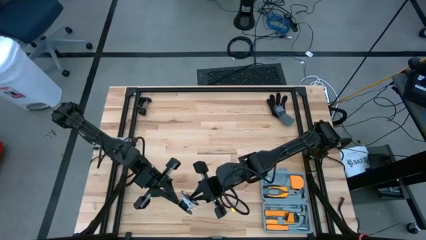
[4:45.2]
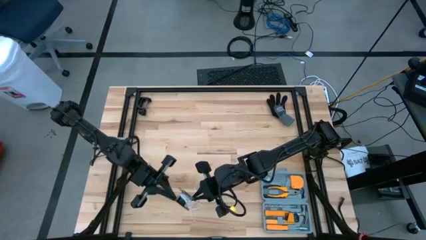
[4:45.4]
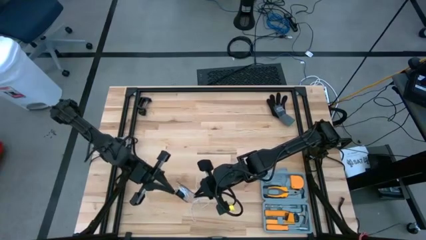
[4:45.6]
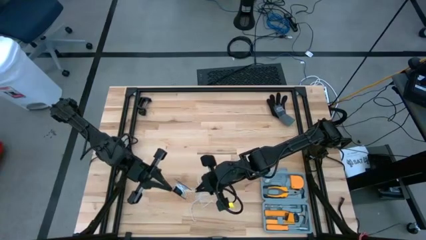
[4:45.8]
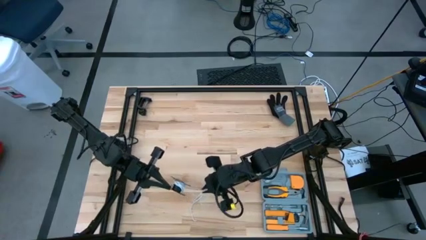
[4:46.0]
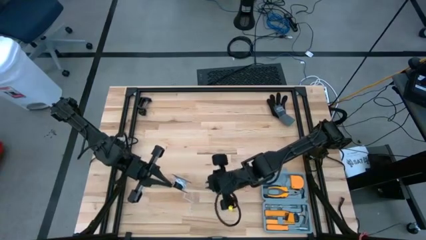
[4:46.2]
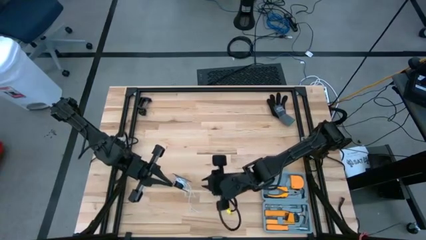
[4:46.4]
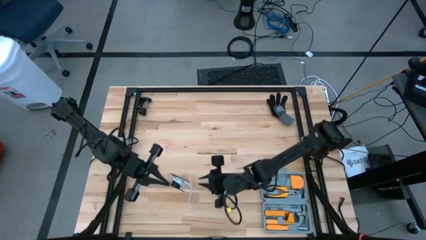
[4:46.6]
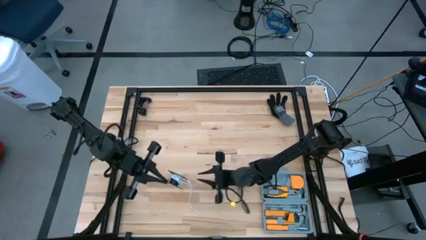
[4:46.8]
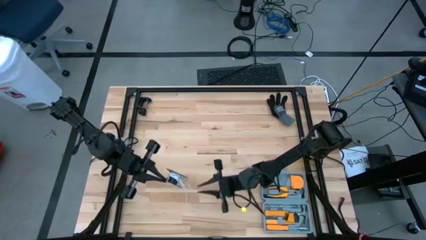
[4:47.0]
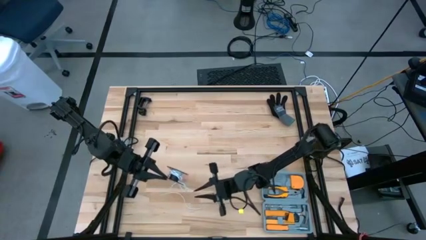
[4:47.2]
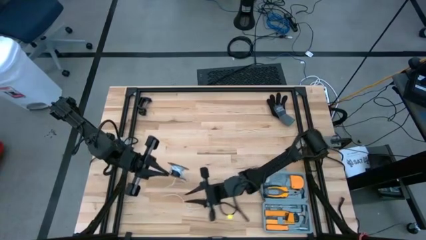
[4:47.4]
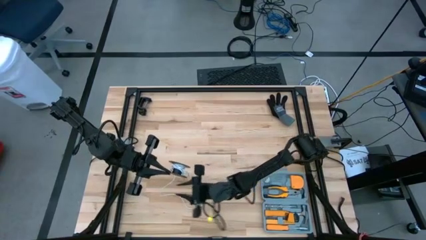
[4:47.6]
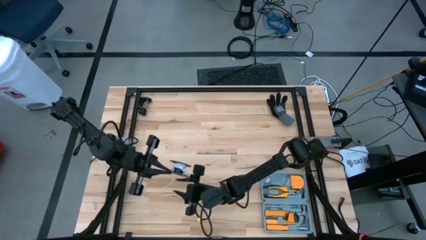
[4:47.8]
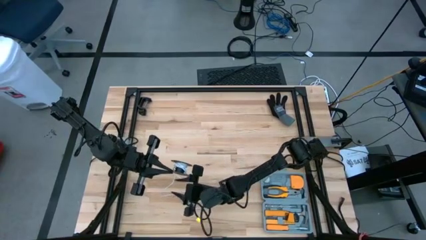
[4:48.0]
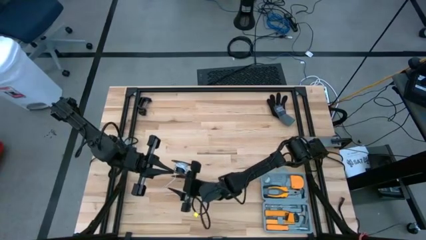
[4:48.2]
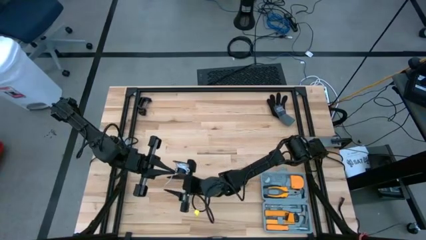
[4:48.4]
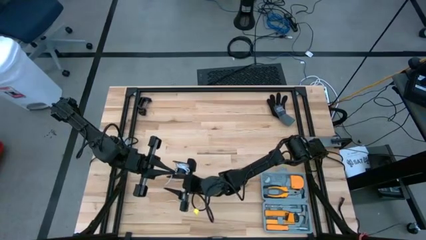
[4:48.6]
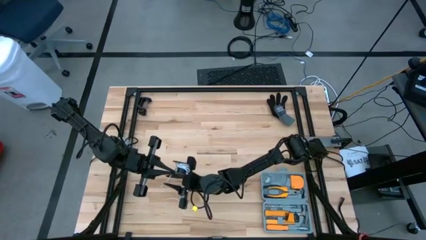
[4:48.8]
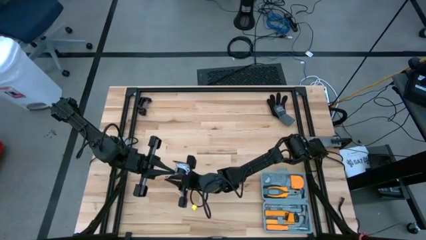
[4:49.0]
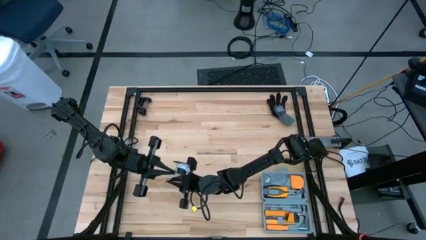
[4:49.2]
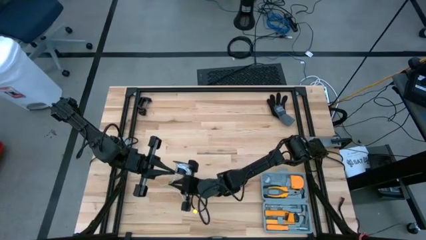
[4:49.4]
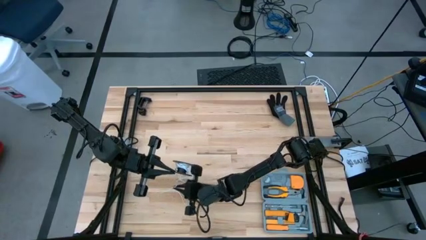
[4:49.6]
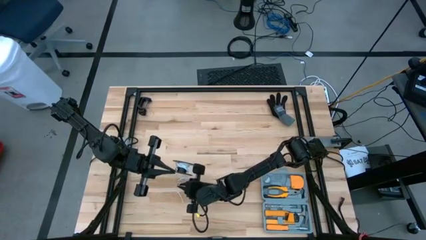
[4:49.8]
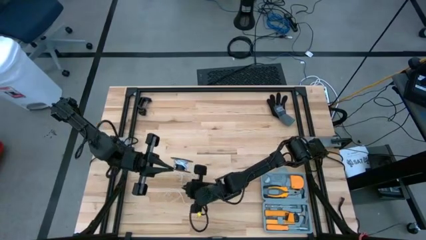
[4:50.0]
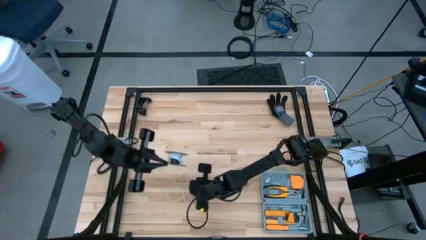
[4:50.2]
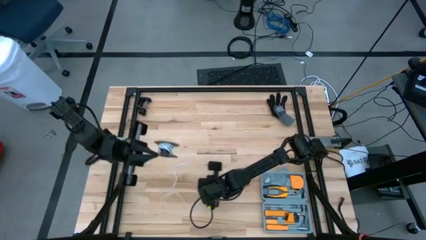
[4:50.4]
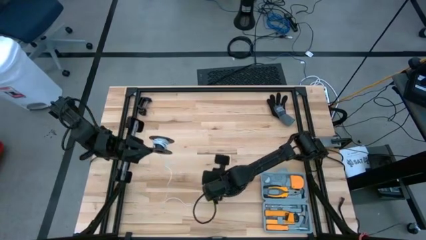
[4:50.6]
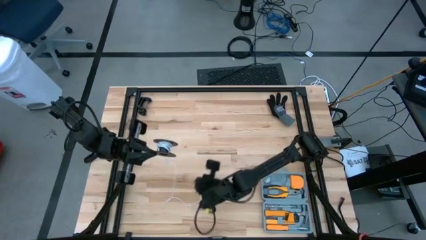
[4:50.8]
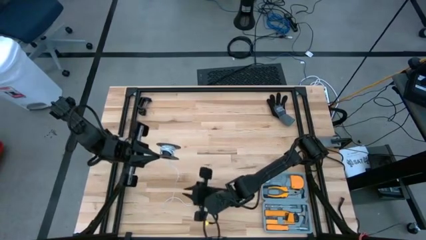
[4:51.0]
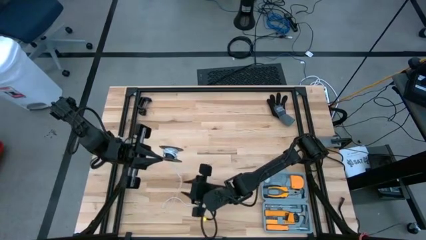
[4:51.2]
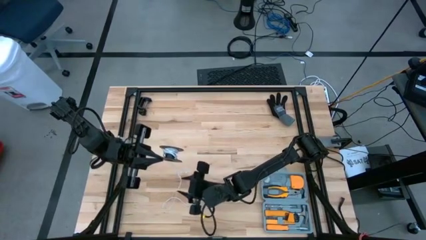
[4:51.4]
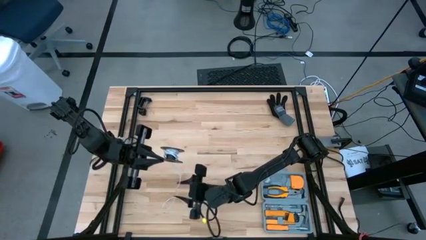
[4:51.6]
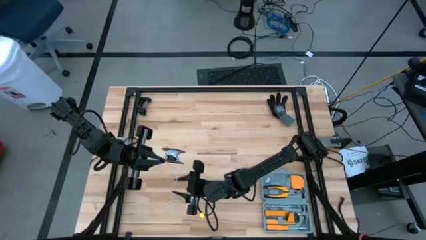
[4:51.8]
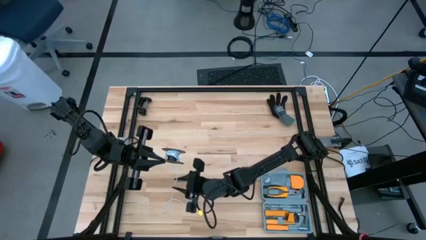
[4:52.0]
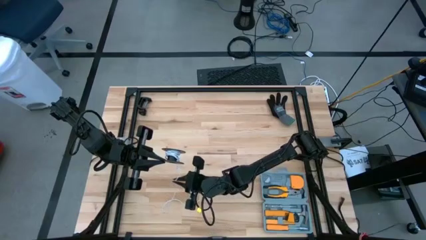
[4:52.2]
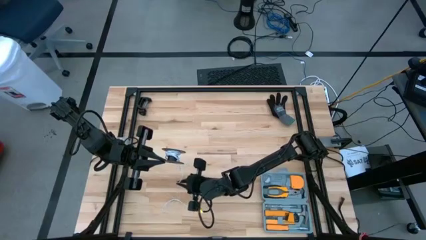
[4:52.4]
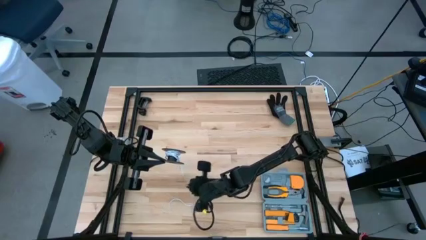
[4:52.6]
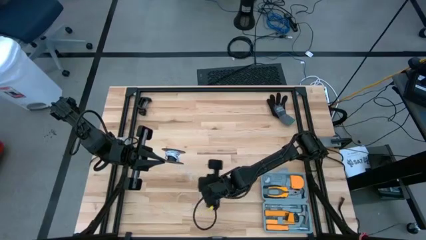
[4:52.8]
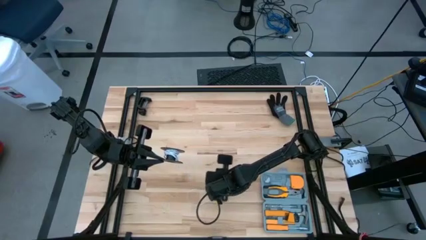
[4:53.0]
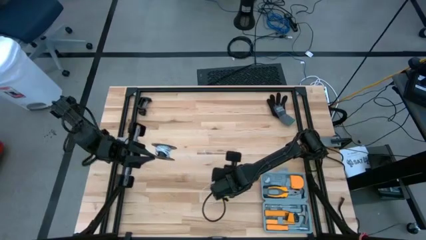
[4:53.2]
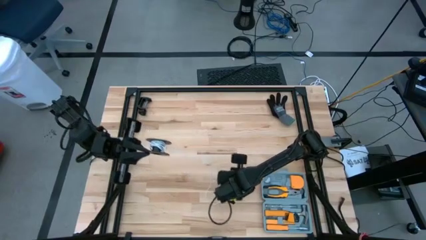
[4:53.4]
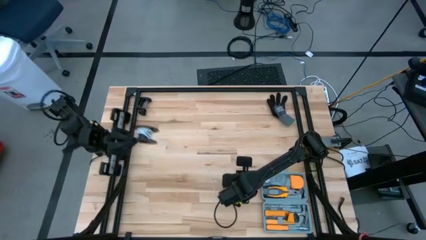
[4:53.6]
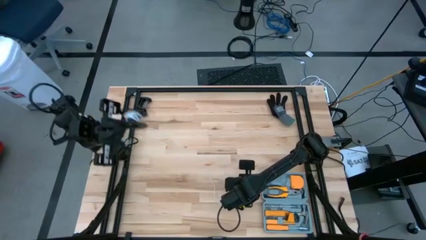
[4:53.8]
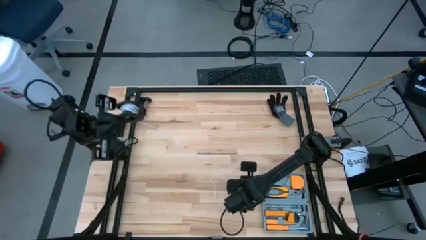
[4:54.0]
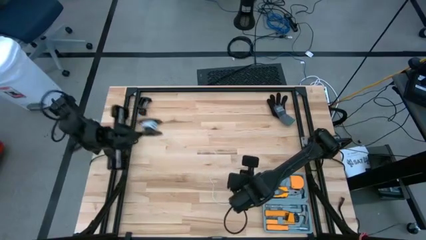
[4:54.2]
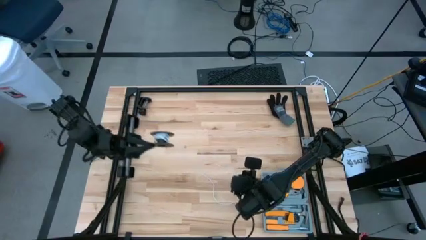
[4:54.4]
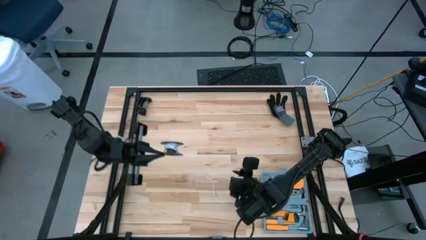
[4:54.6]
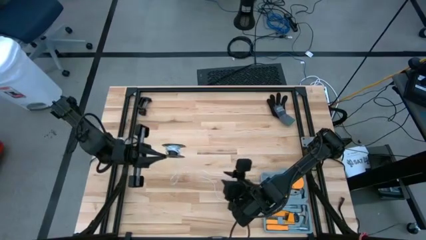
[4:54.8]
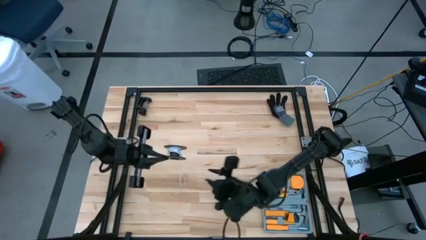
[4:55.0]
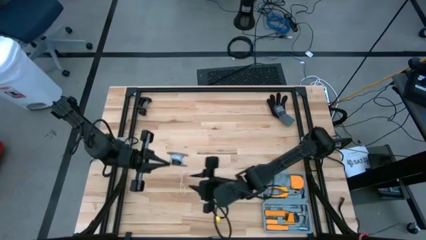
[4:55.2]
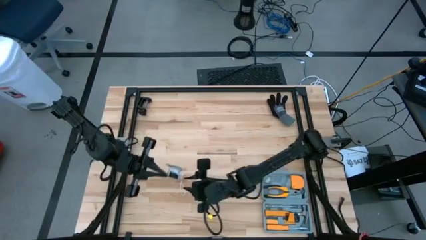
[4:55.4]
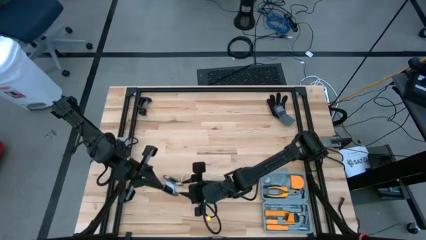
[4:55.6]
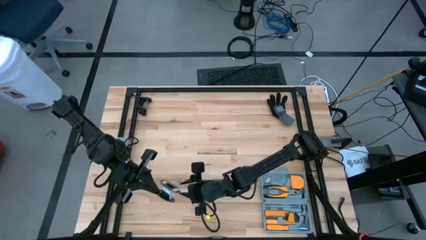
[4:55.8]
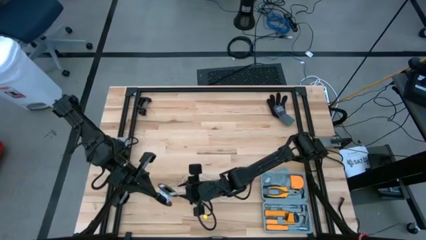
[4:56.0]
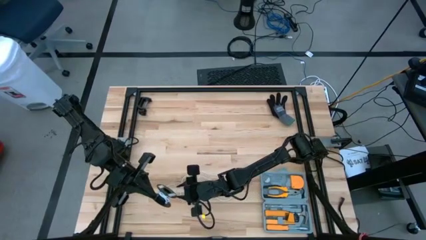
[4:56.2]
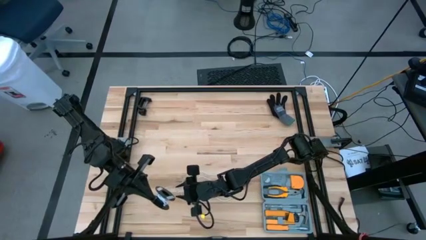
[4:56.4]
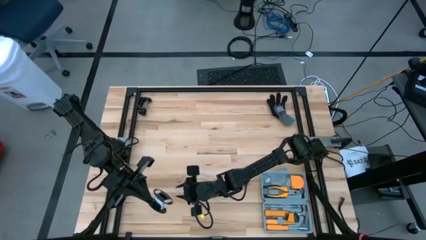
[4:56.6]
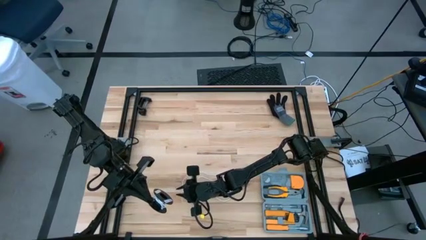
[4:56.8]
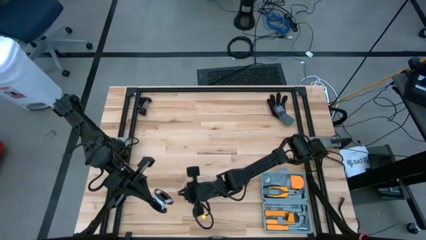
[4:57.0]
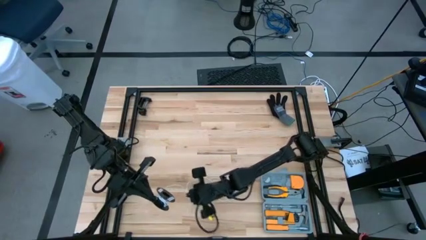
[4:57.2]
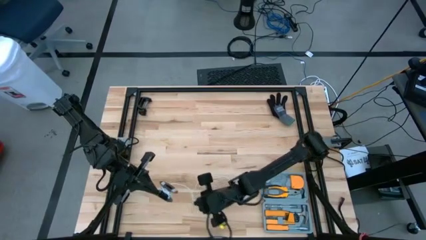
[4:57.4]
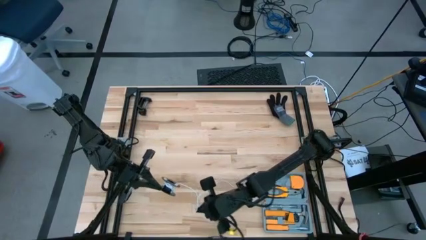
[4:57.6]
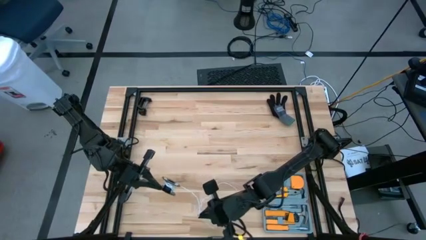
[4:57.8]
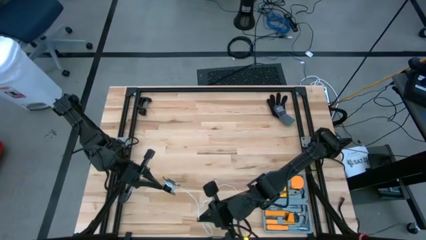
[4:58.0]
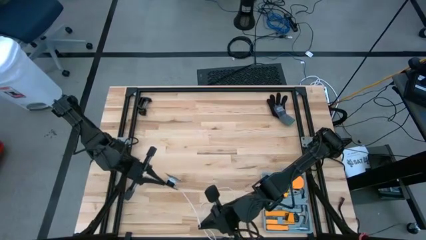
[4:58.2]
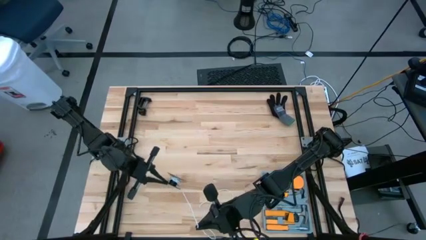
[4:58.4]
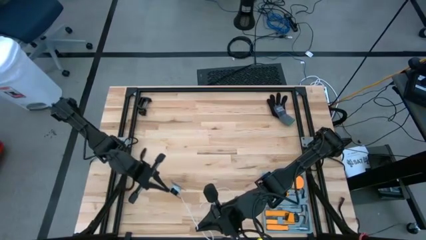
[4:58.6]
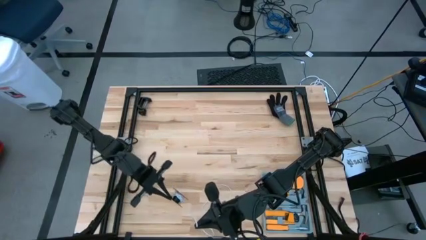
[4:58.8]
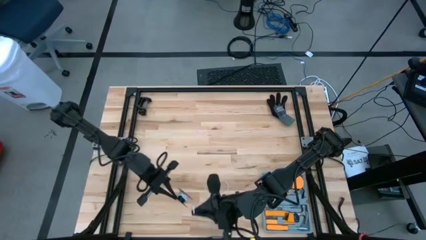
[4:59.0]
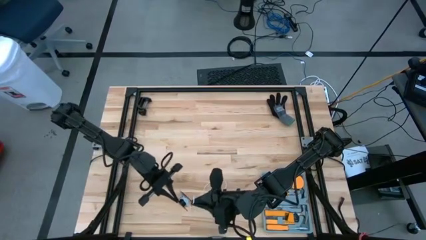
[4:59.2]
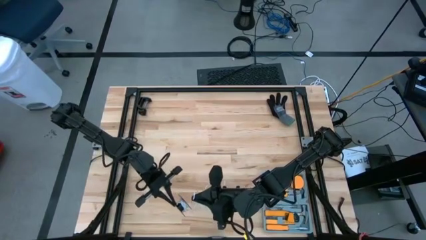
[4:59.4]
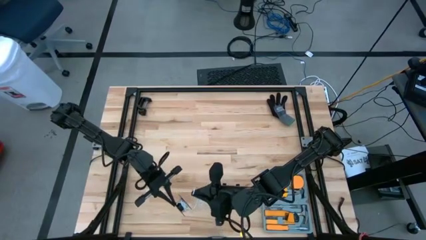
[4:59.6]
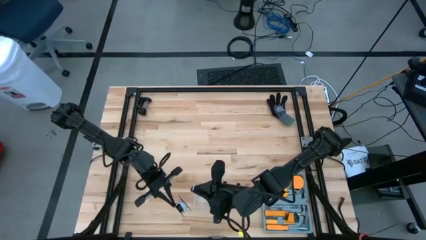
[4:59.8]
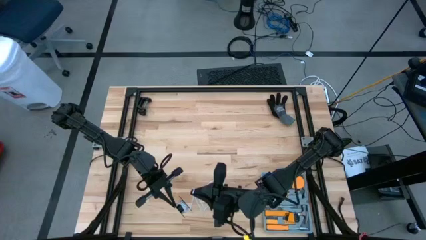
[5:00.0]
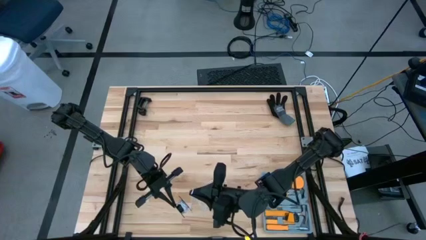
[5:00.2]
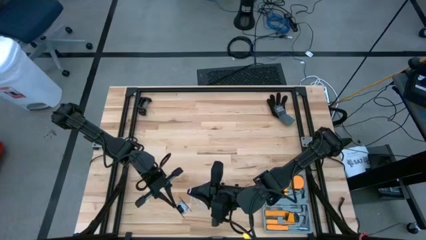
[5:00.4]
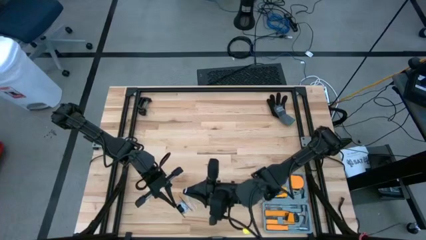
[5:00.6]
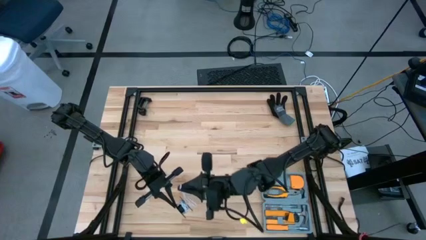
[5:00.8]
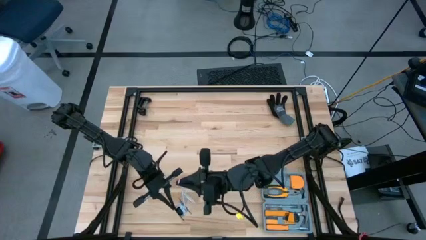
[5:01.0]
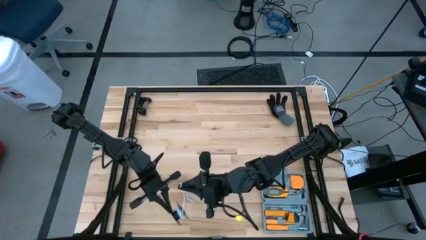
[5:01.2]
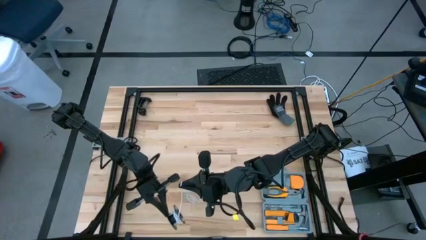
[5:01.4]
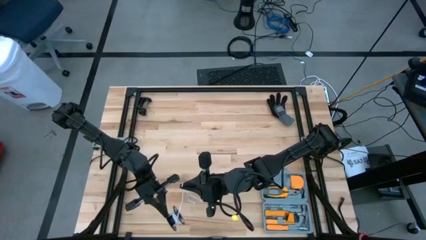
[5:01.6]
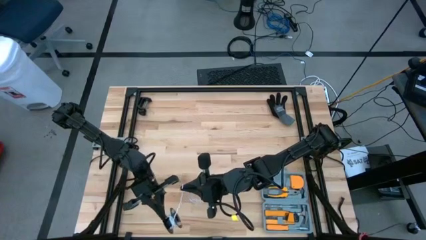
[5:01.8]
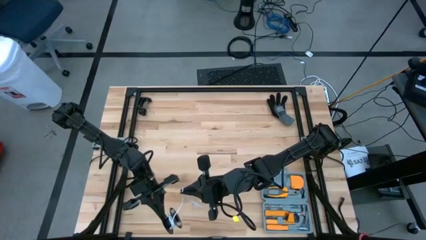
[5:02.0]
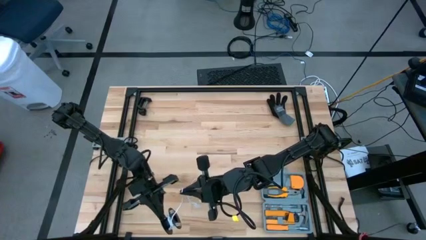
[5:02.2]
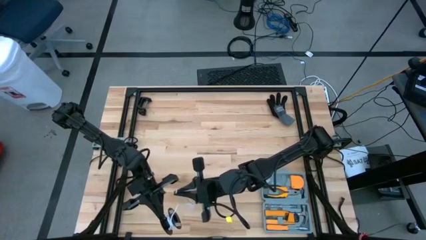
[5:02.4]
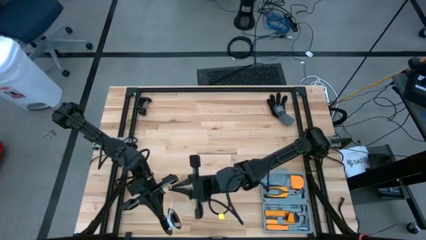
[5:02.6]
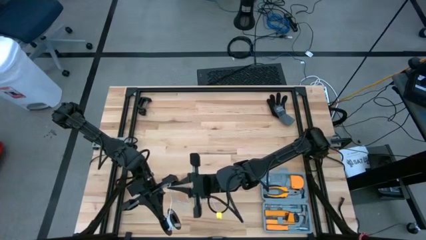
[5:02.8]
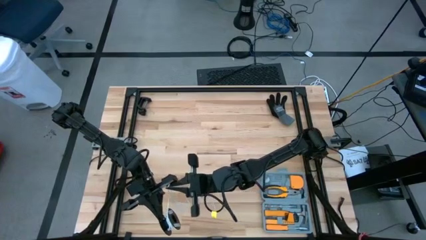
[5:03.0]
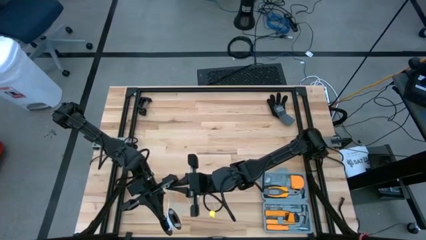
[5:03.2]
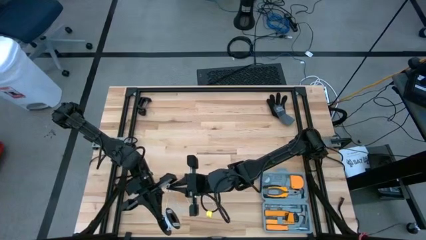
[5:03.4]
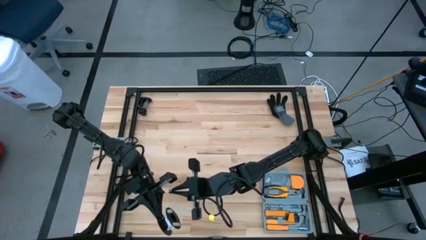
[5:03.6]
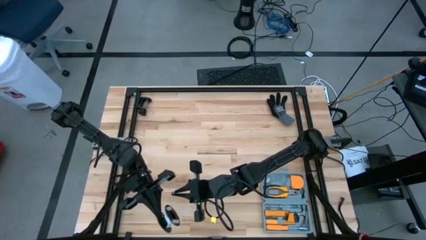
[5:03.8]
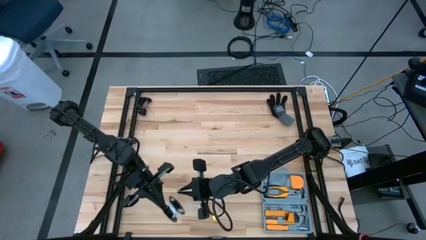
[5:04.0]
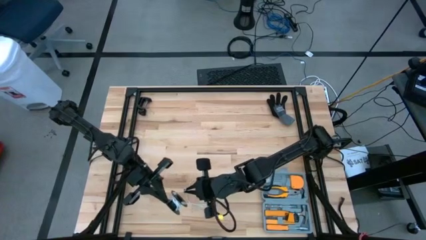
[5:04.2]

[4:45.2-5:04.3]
Task: Coil cords
Coil the white cable wire onto the spool
